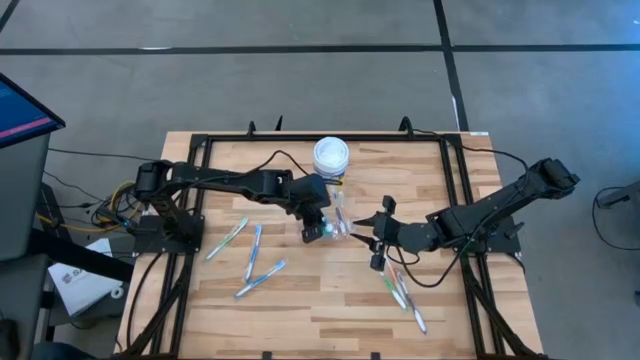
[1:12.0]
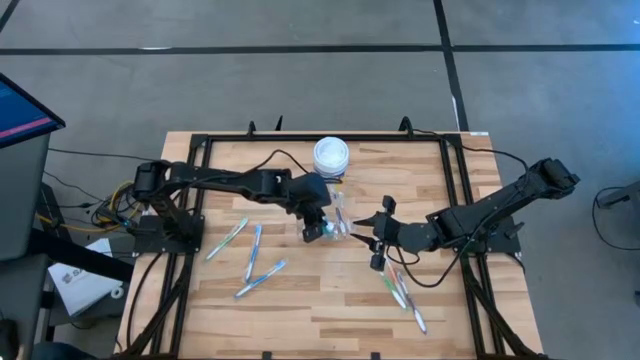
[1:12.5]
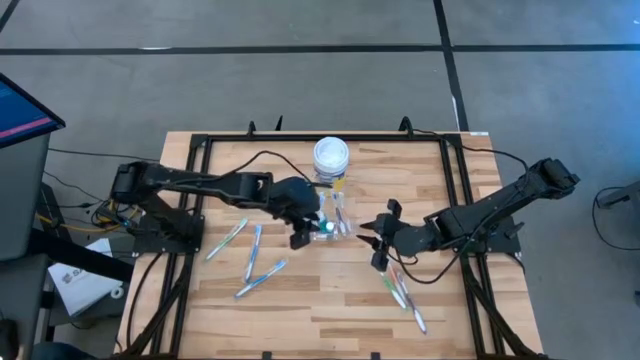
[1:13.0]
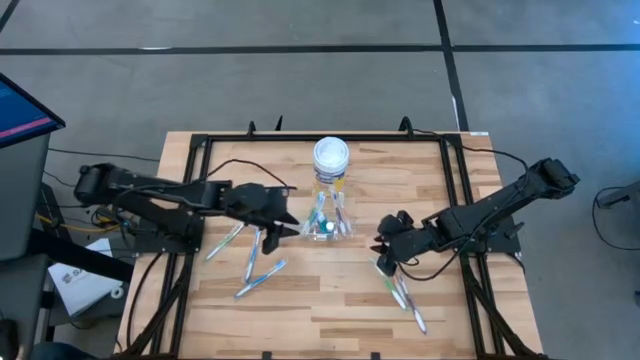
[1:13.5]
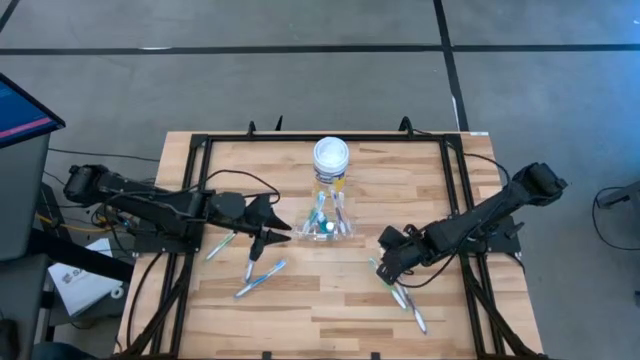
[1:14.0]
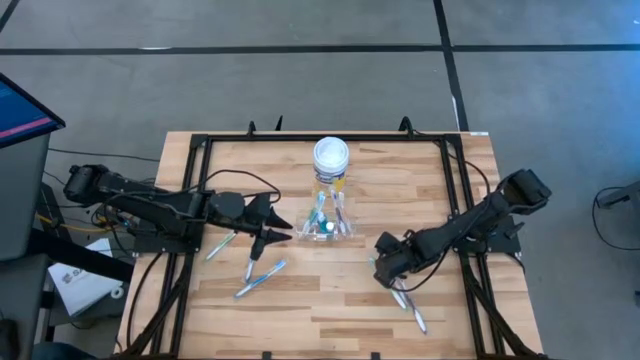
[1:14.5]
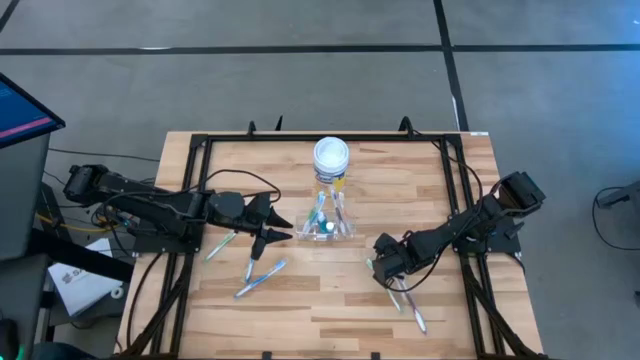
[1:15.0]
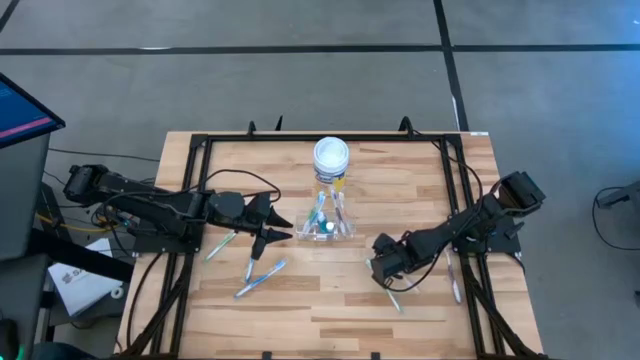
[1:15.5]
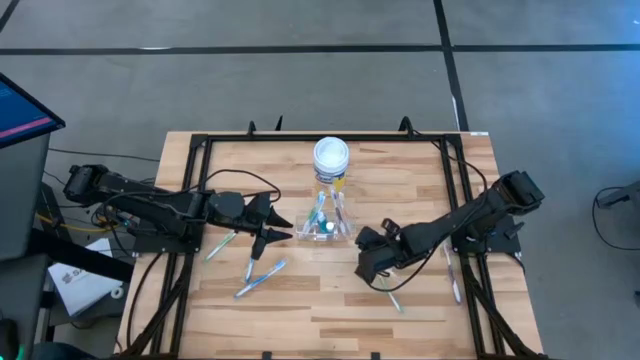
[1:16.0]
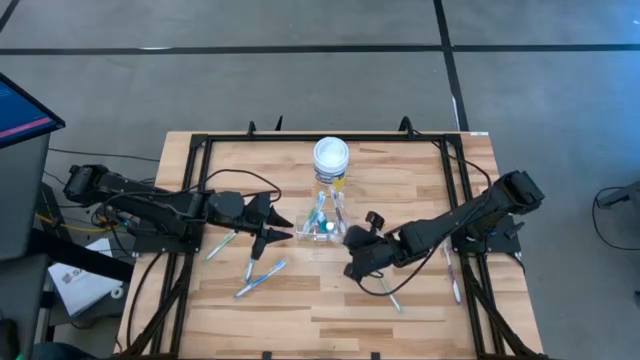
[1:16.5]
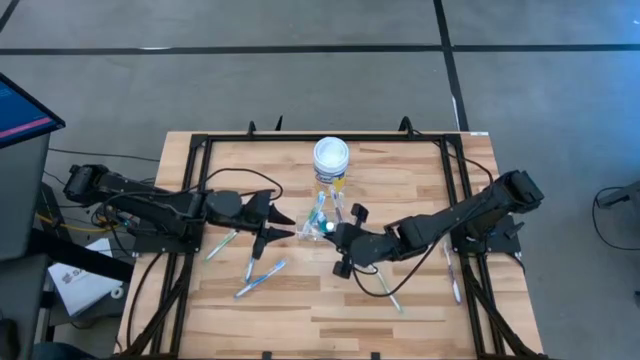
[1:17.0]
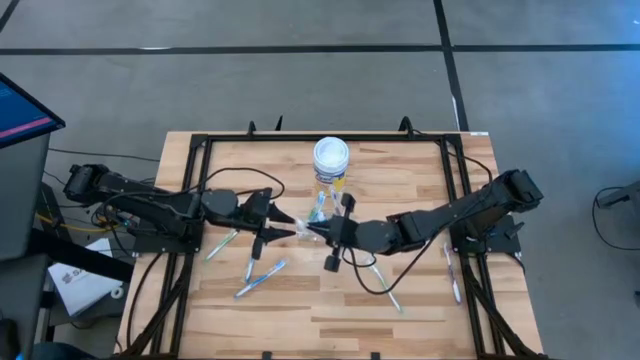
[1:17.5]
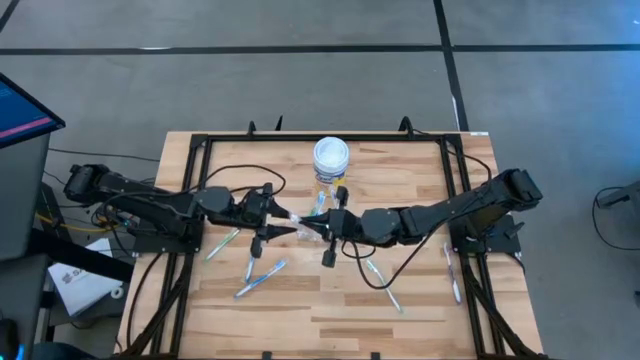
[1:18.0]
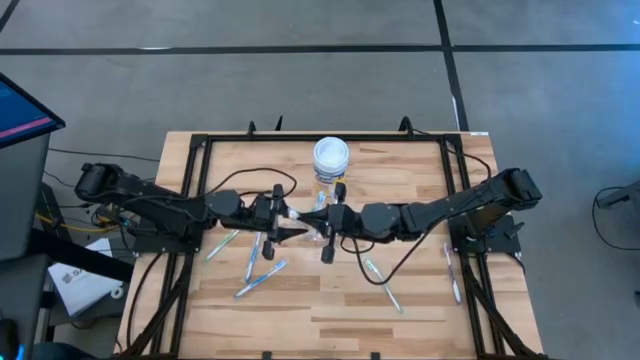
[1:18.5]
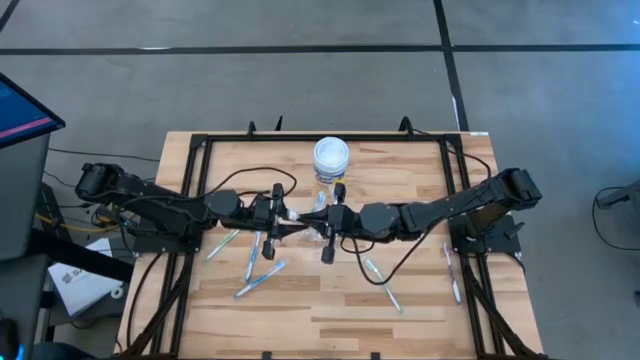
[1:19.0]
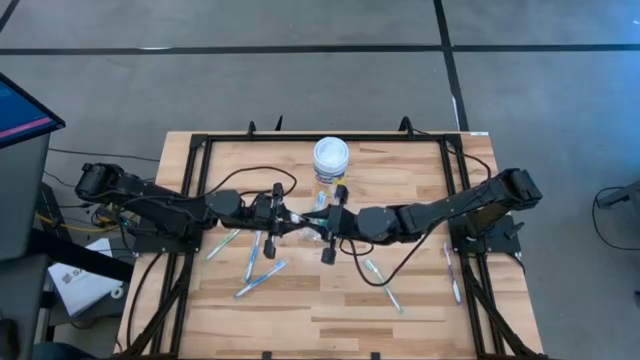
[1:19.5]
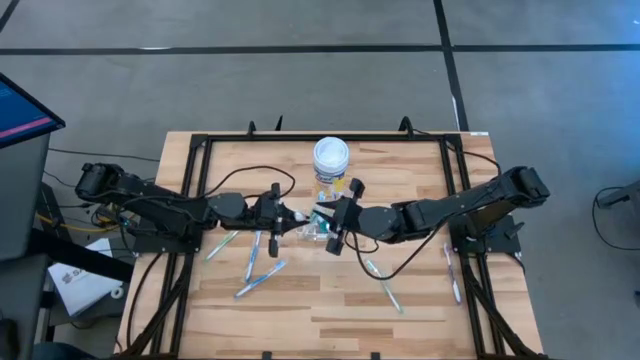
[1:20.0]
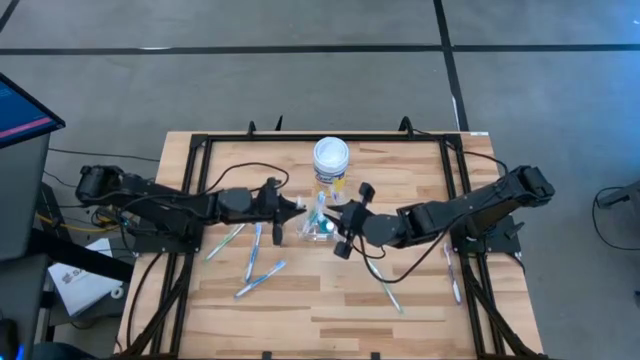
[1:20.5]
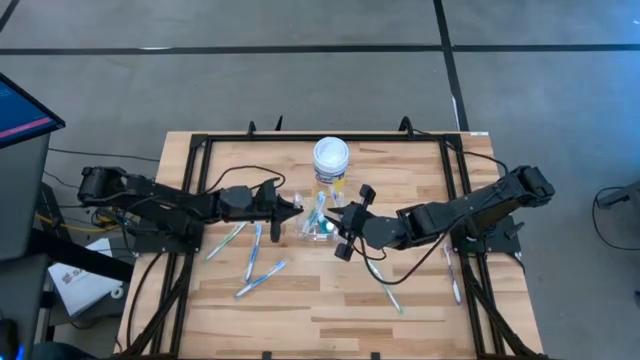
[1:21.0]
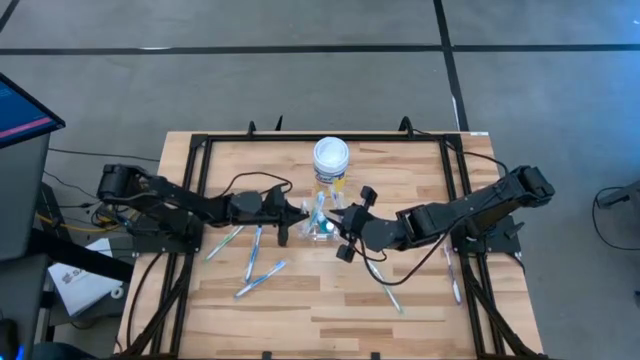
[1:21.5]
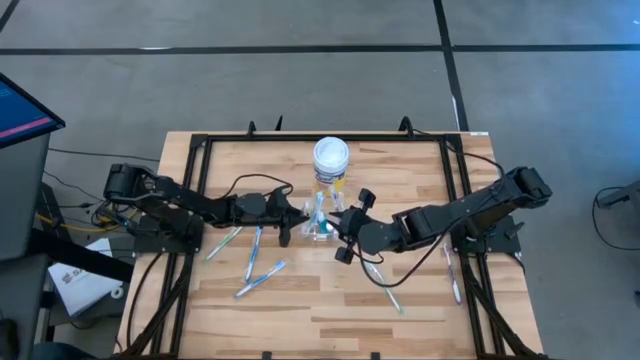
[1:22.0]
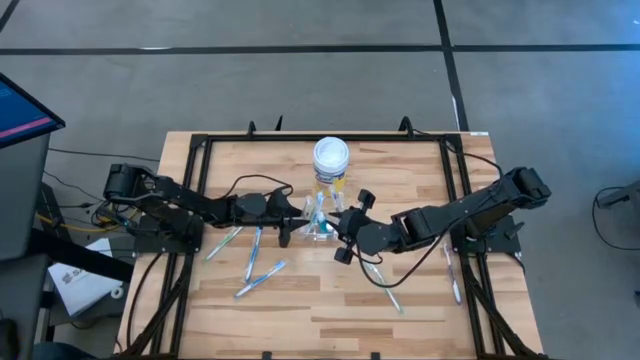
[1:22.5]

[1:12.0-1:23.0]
Task: Pick & Place toothbrushing station
Put the orange toothbrush into the transparent organizer

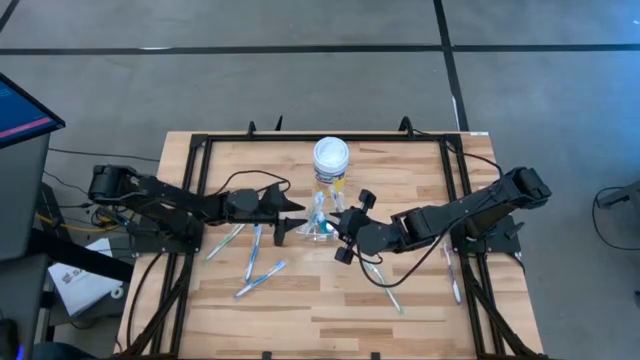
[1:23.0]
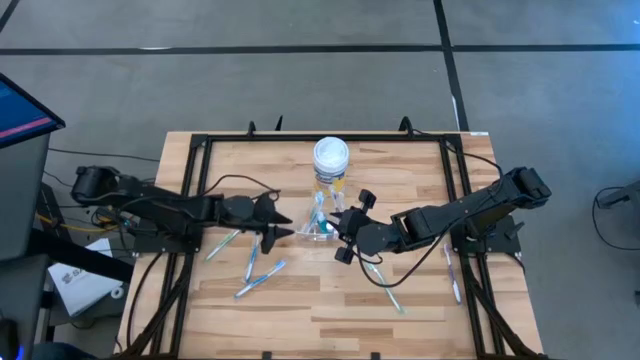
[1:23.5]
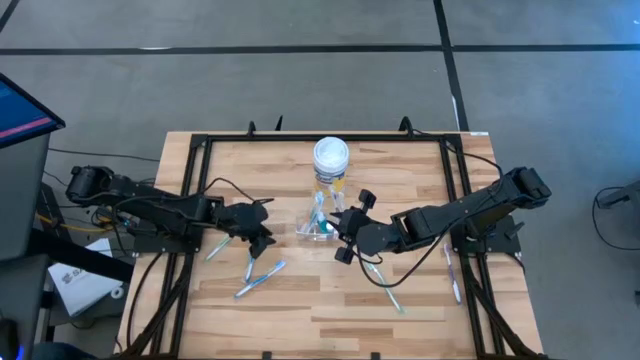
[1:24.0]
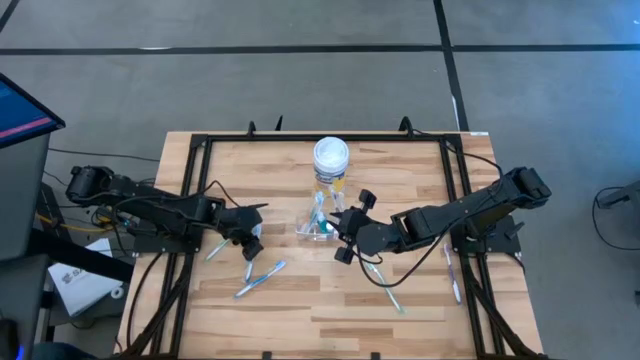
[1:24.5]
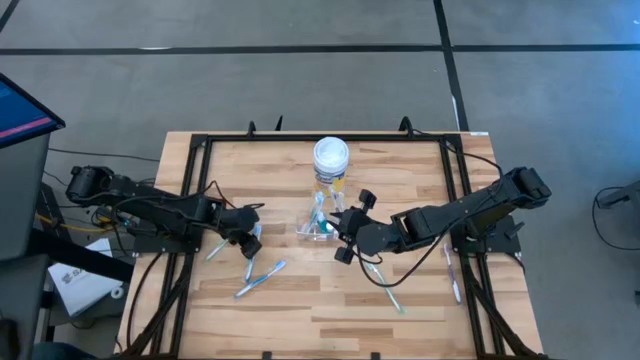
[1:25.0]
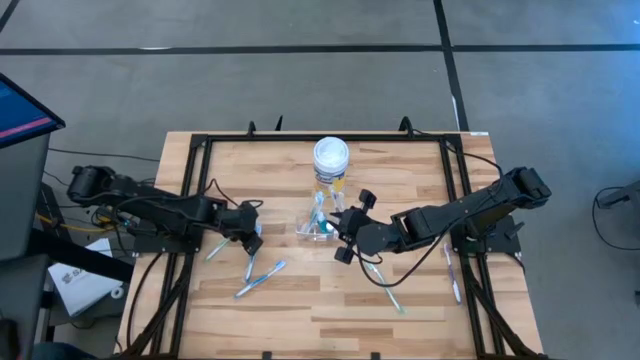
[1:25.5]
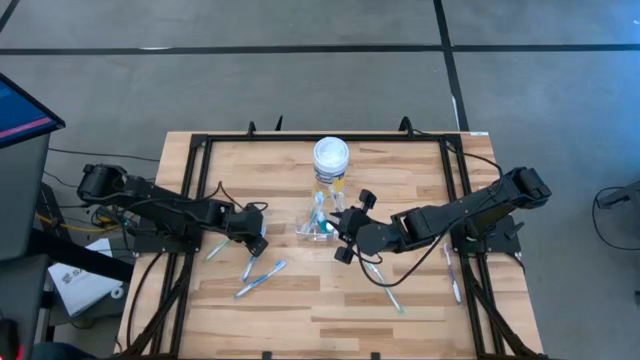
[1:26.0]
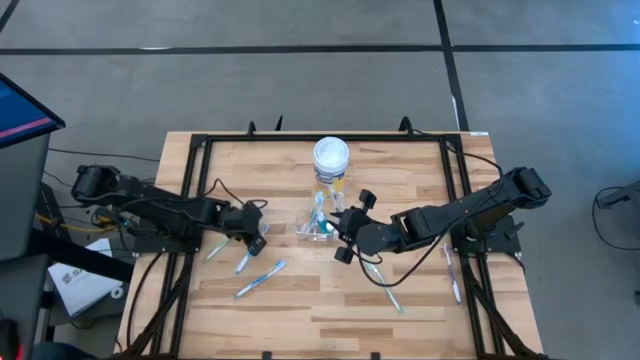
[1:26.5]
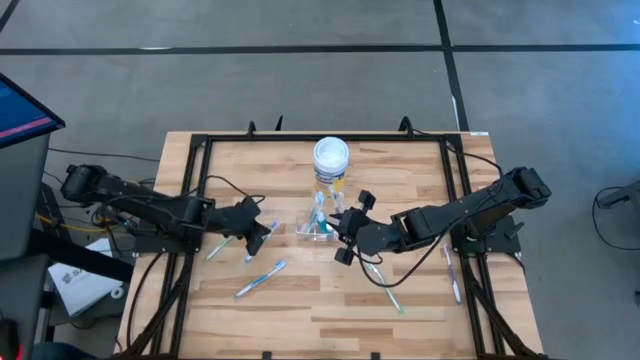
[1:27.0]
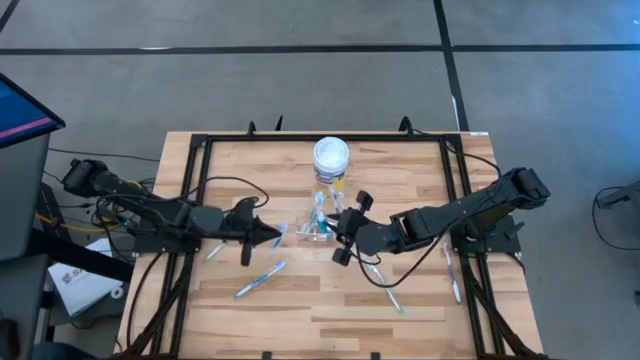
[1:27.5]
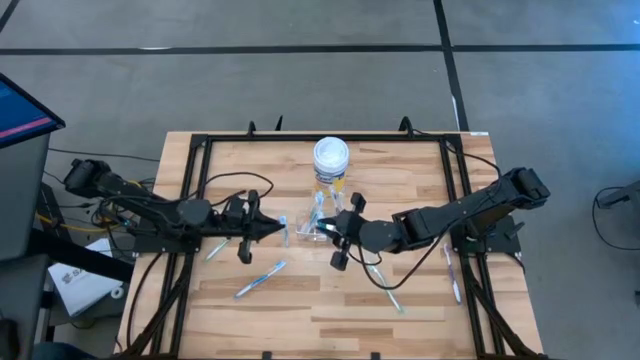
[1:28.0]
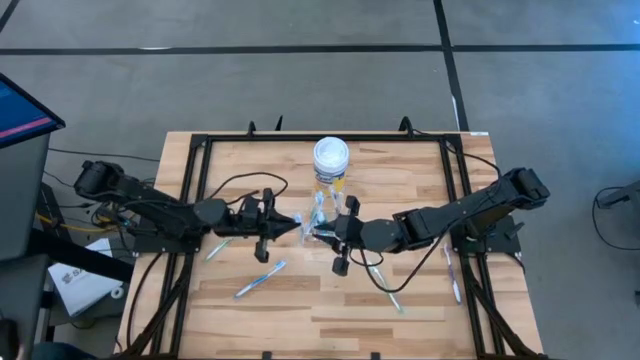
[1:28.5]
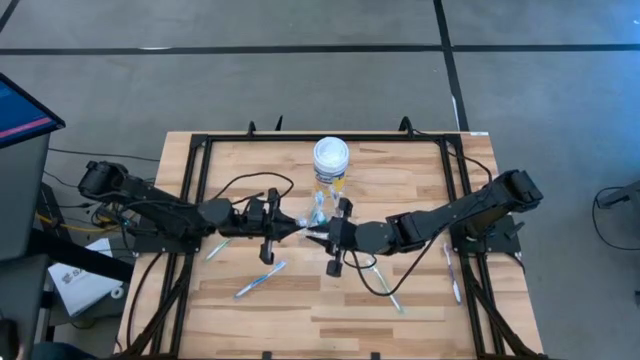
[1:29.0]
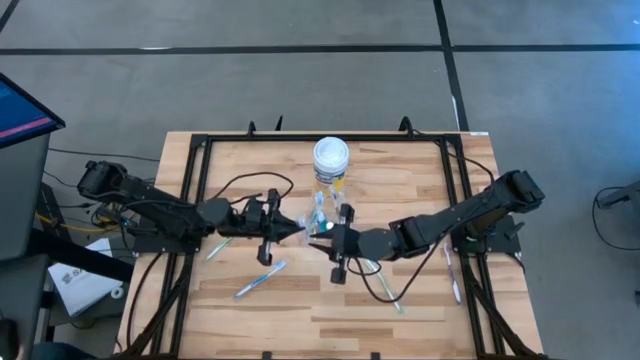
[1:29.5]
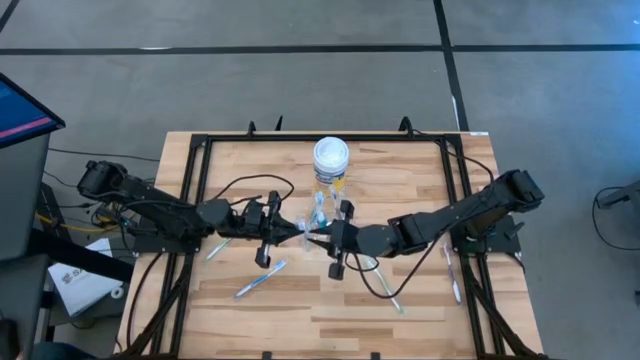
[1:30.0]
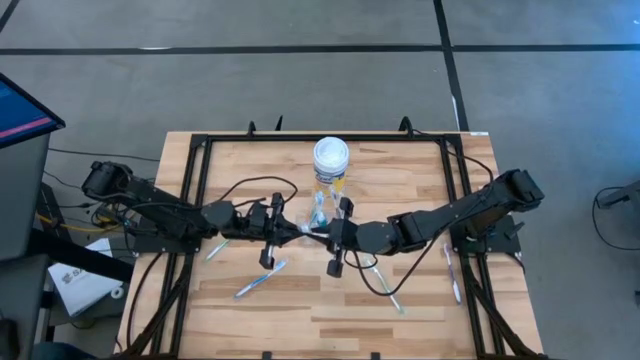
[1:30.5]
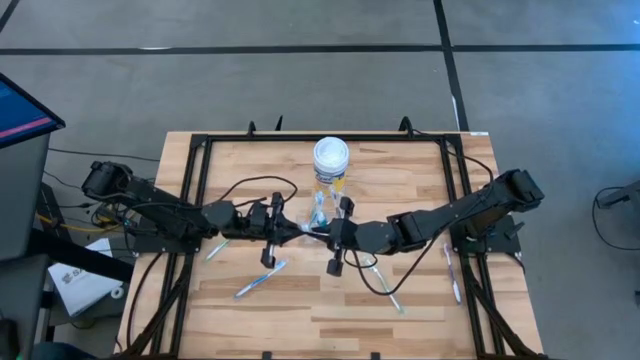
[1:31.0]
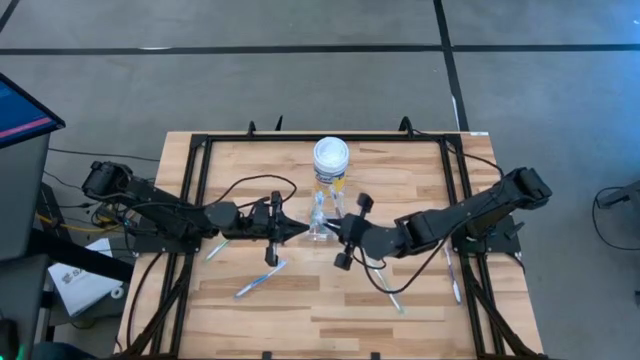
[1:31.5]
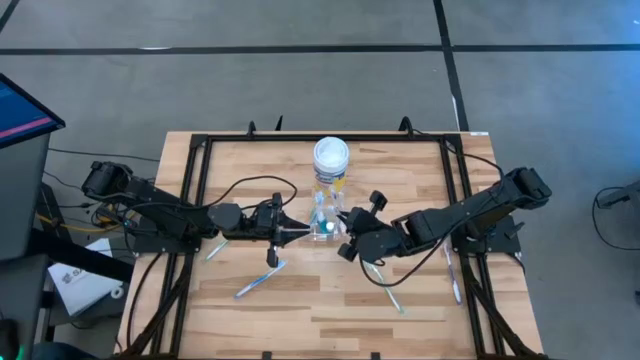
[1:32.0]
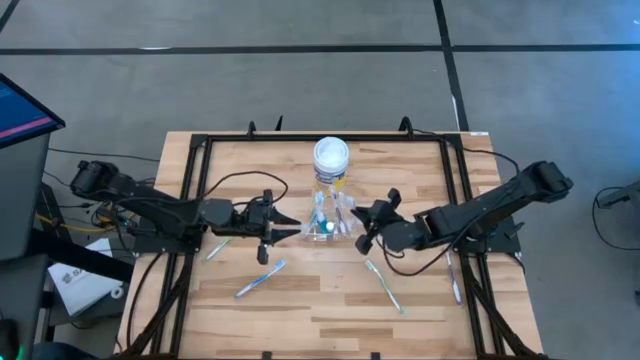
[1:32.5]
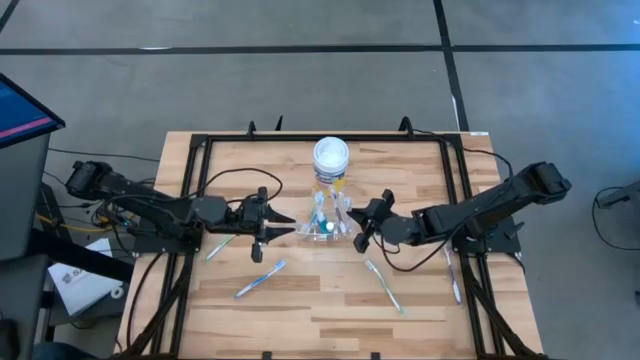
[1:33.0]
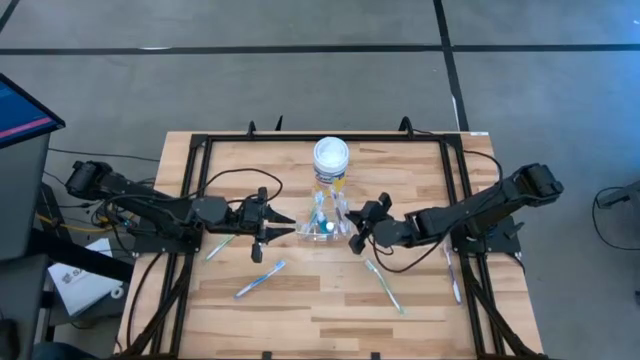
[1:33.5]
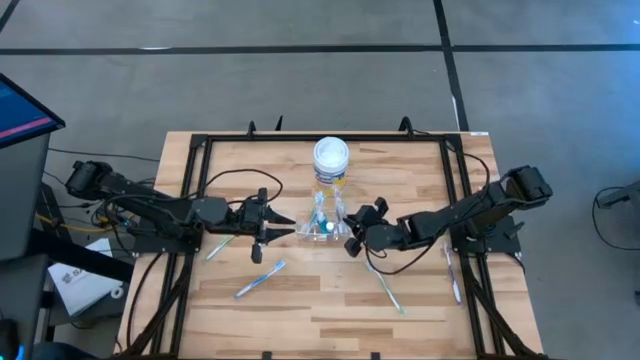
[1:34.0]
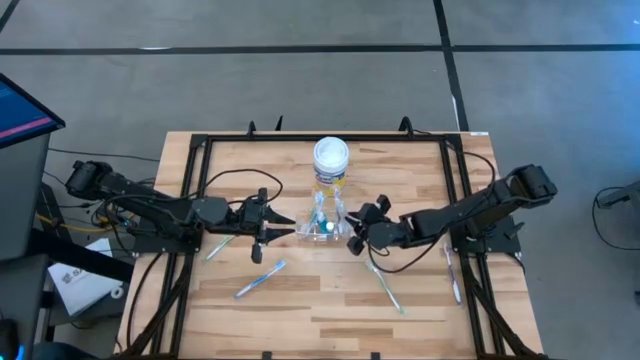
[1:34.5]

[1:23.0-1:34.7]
Put the left blue toothbrush into the transparent organizer
